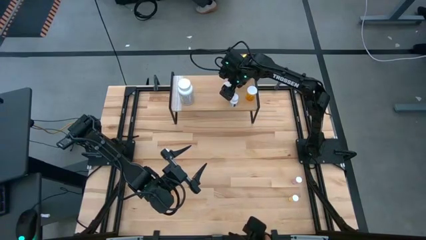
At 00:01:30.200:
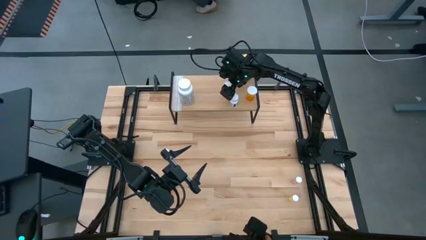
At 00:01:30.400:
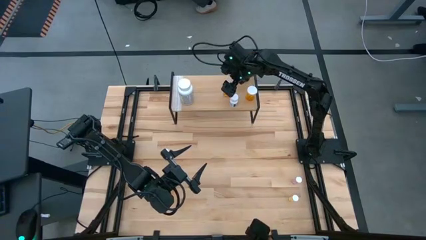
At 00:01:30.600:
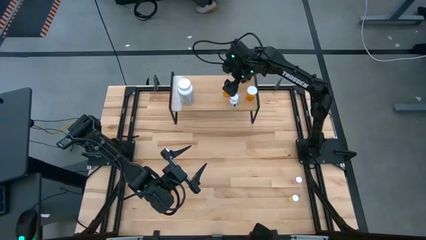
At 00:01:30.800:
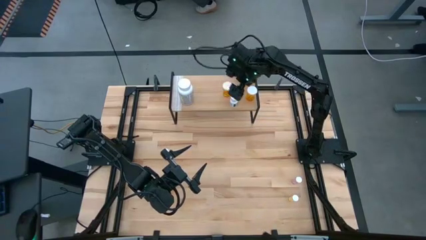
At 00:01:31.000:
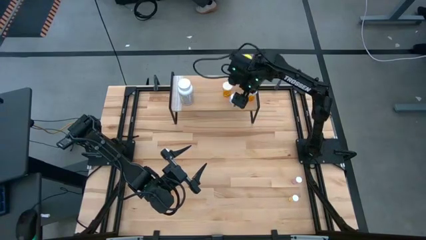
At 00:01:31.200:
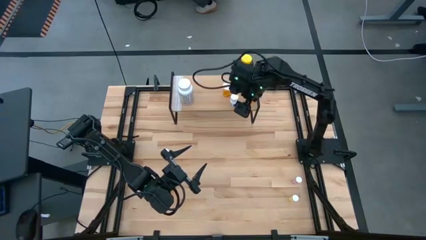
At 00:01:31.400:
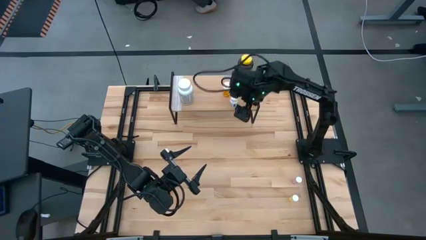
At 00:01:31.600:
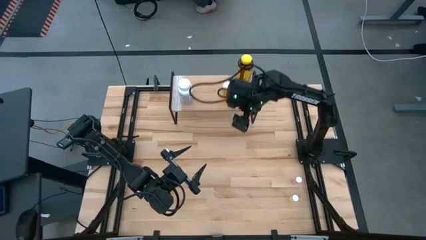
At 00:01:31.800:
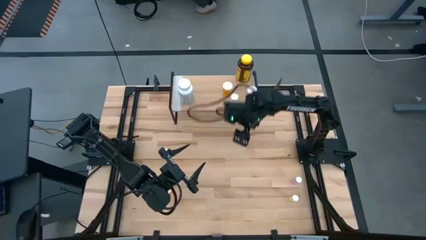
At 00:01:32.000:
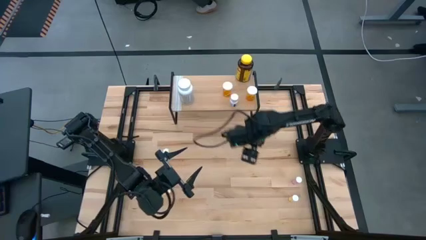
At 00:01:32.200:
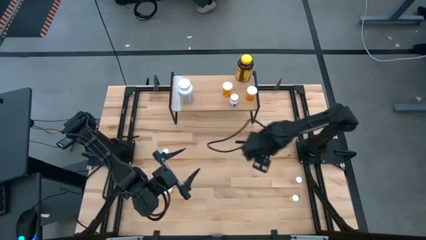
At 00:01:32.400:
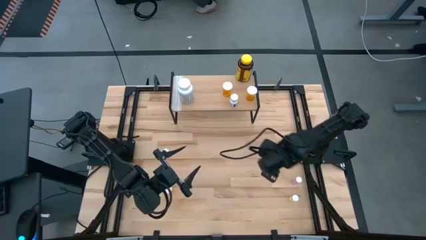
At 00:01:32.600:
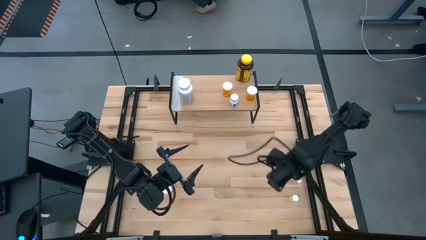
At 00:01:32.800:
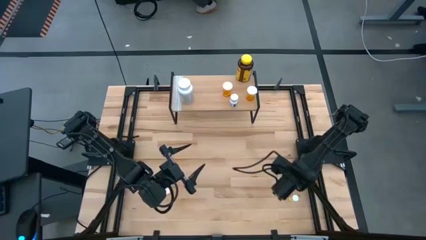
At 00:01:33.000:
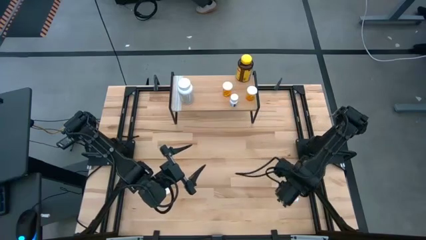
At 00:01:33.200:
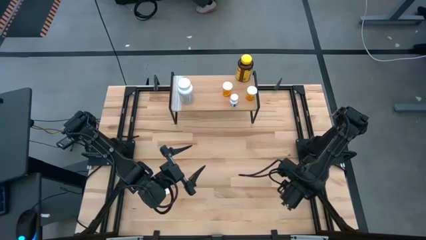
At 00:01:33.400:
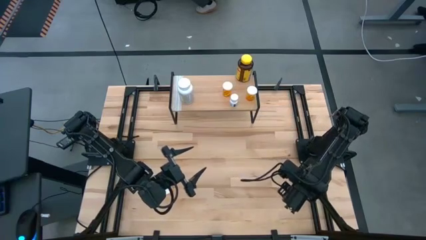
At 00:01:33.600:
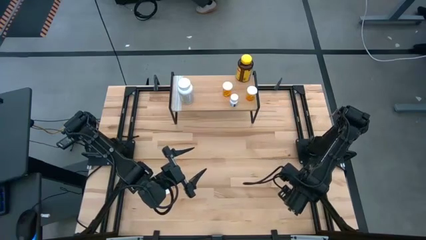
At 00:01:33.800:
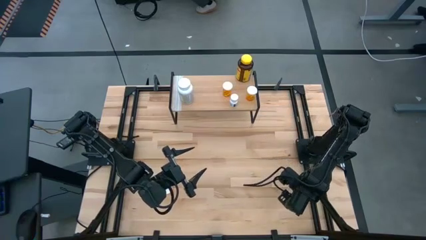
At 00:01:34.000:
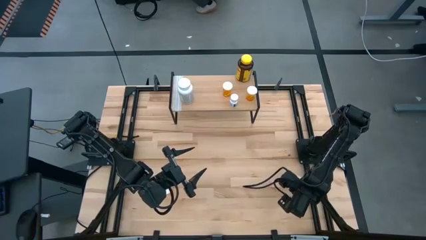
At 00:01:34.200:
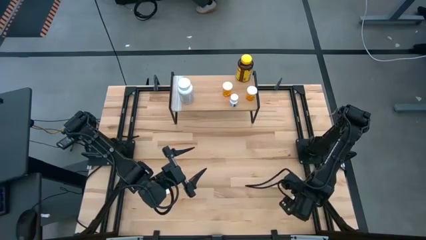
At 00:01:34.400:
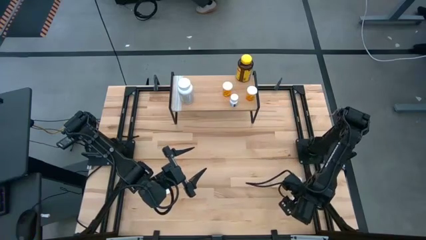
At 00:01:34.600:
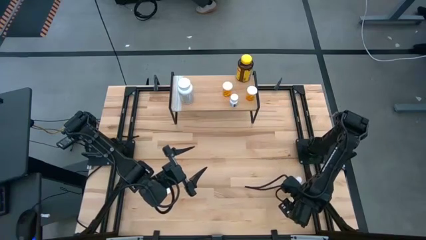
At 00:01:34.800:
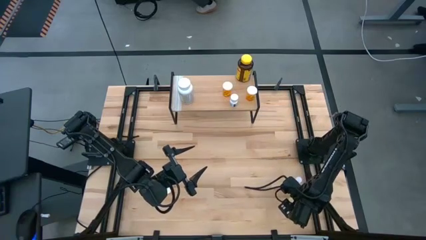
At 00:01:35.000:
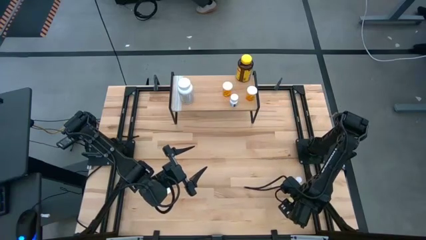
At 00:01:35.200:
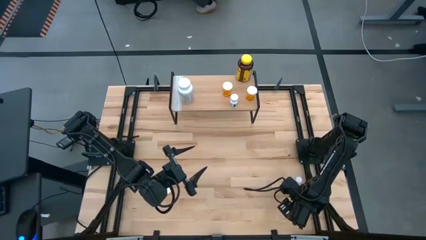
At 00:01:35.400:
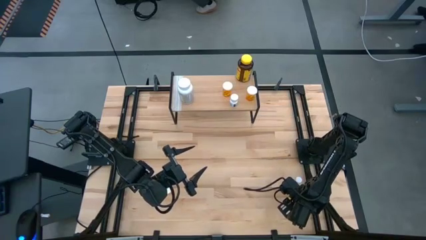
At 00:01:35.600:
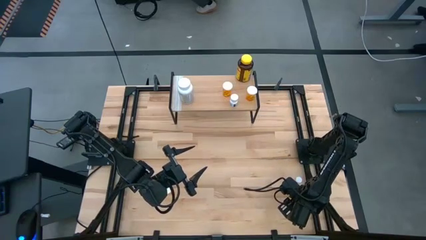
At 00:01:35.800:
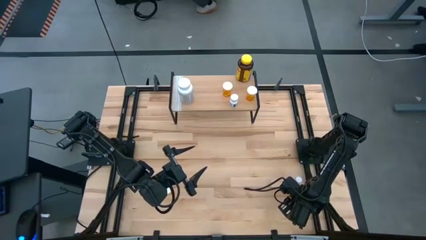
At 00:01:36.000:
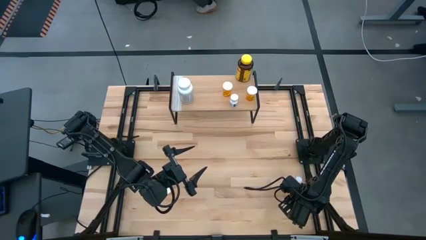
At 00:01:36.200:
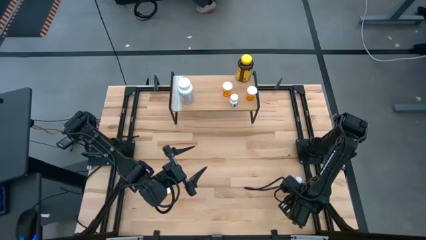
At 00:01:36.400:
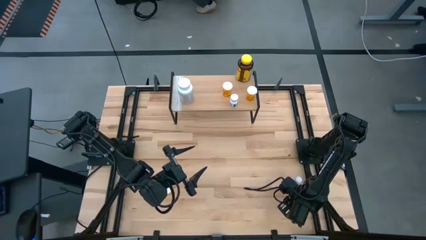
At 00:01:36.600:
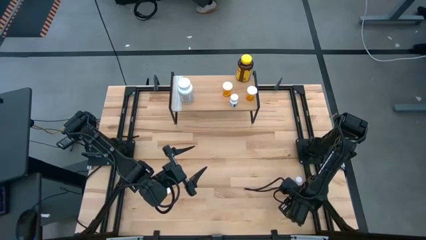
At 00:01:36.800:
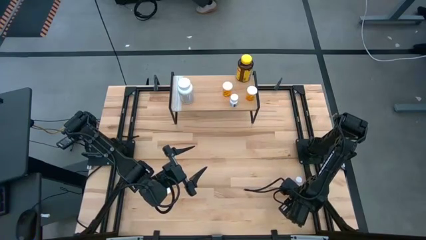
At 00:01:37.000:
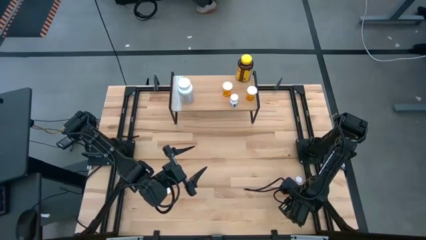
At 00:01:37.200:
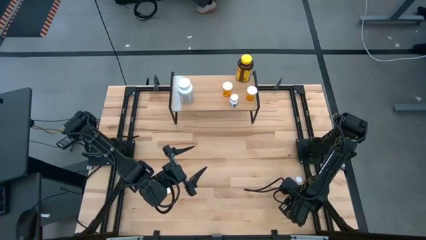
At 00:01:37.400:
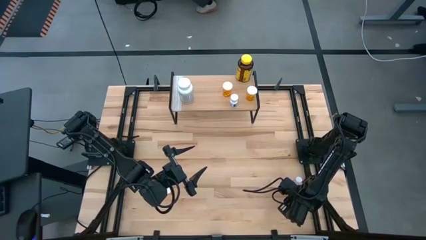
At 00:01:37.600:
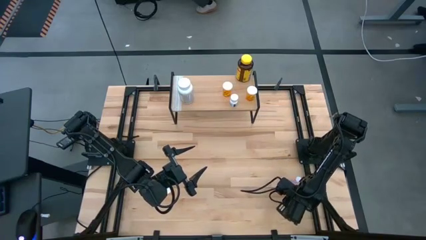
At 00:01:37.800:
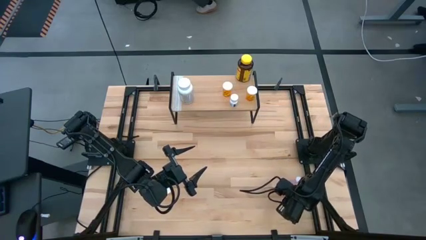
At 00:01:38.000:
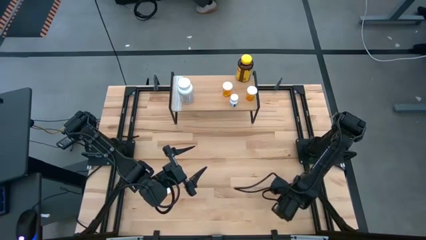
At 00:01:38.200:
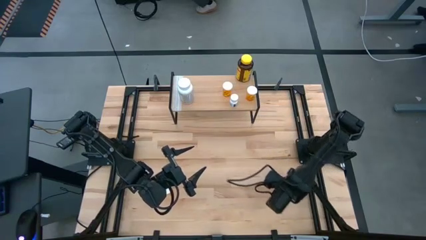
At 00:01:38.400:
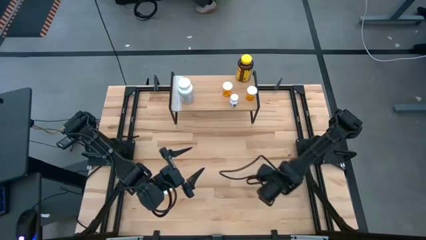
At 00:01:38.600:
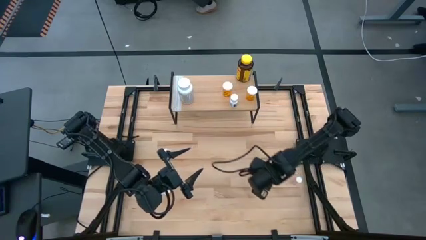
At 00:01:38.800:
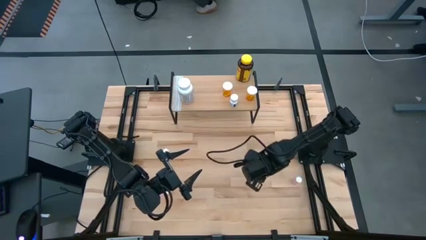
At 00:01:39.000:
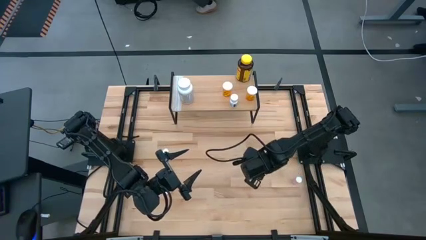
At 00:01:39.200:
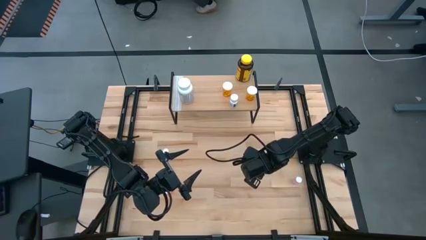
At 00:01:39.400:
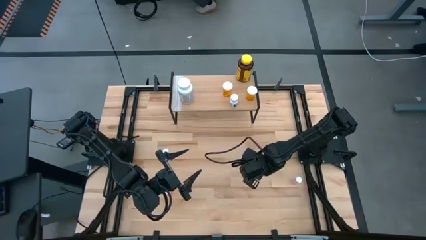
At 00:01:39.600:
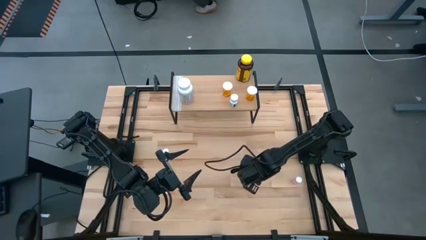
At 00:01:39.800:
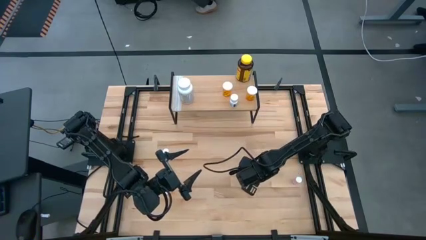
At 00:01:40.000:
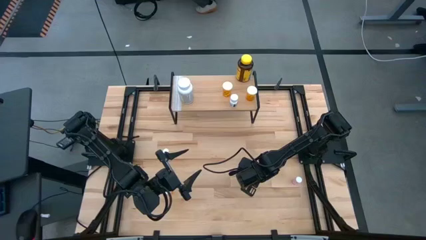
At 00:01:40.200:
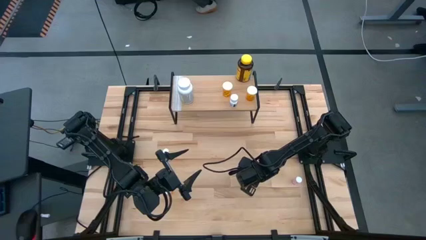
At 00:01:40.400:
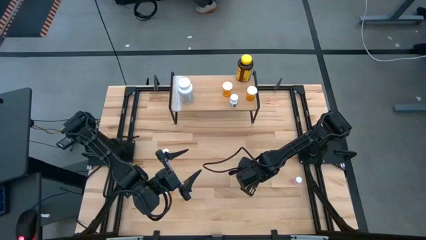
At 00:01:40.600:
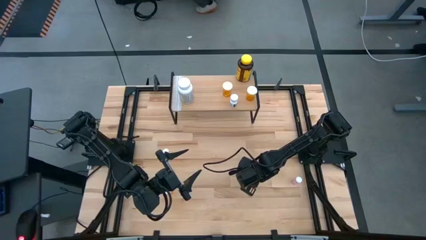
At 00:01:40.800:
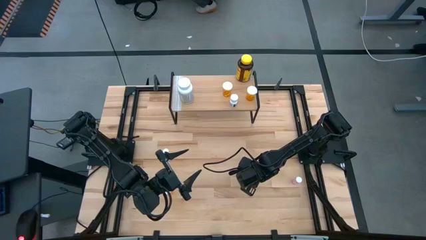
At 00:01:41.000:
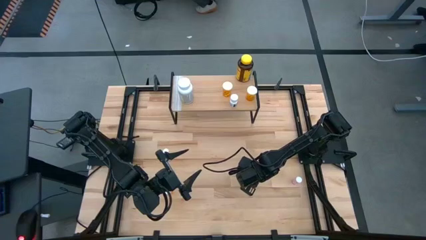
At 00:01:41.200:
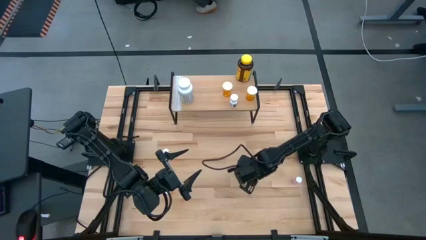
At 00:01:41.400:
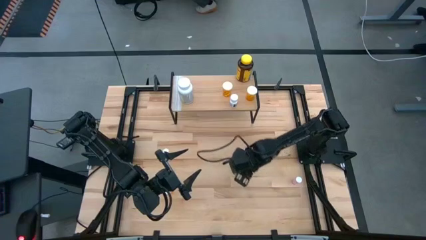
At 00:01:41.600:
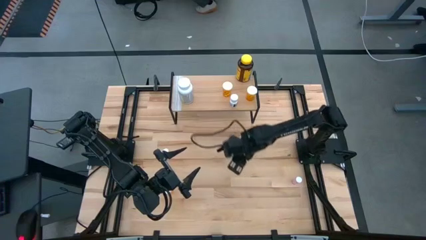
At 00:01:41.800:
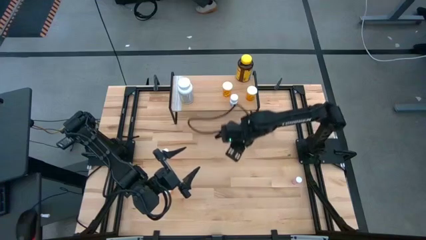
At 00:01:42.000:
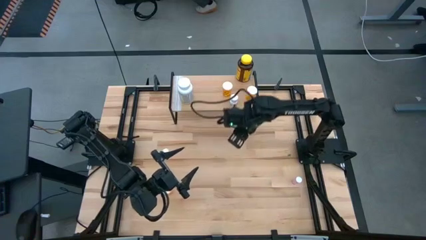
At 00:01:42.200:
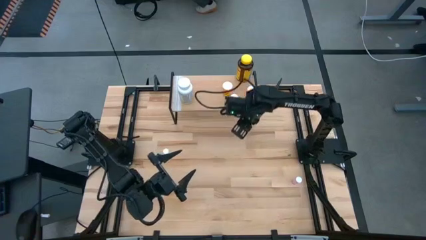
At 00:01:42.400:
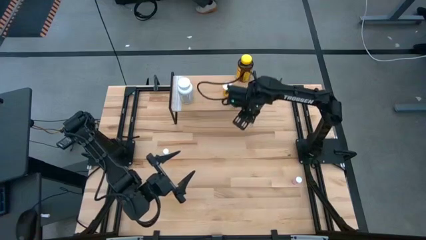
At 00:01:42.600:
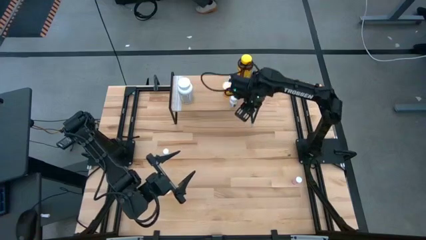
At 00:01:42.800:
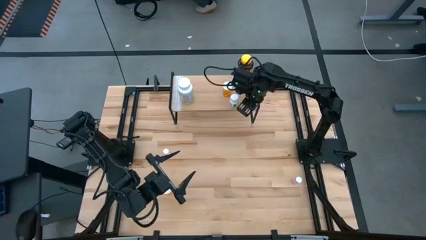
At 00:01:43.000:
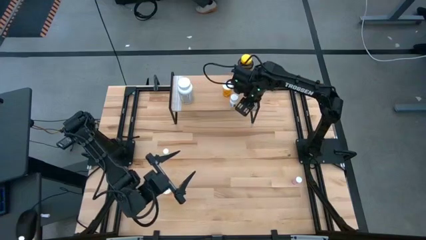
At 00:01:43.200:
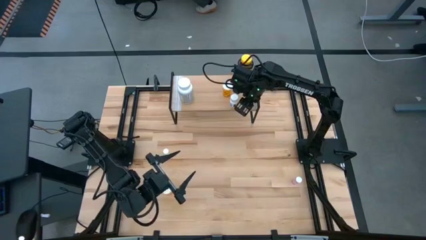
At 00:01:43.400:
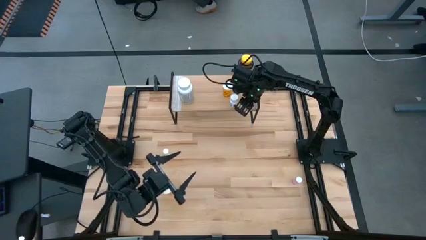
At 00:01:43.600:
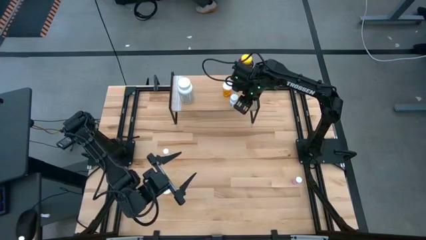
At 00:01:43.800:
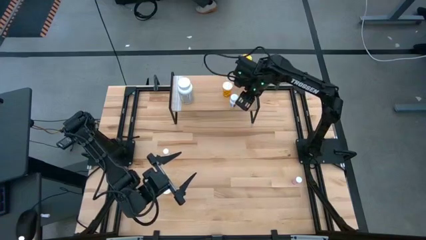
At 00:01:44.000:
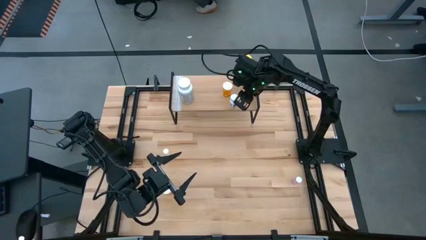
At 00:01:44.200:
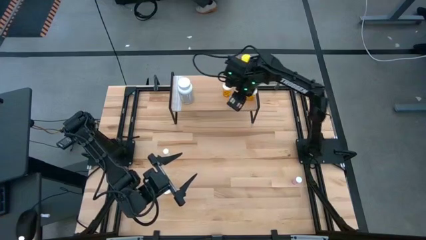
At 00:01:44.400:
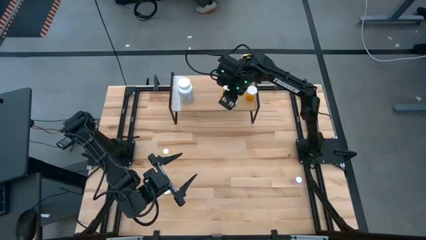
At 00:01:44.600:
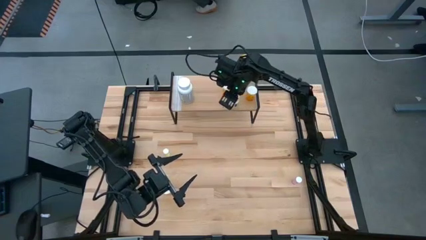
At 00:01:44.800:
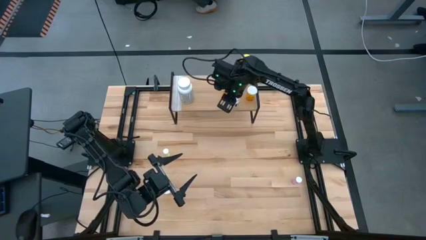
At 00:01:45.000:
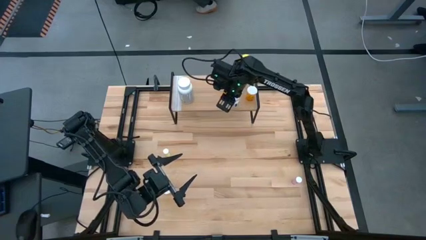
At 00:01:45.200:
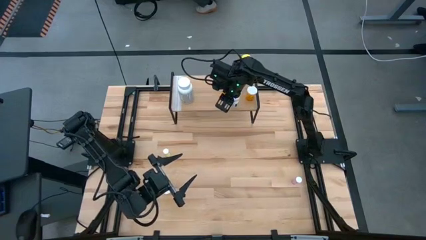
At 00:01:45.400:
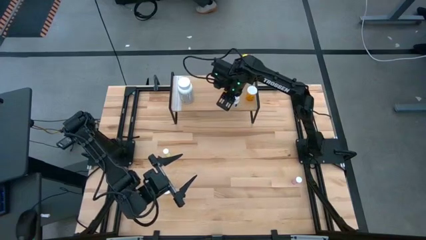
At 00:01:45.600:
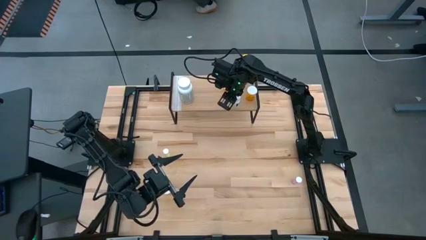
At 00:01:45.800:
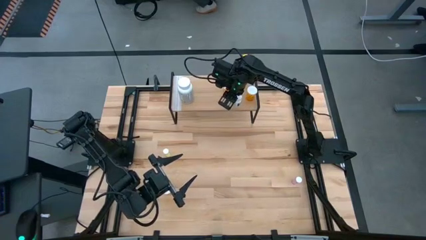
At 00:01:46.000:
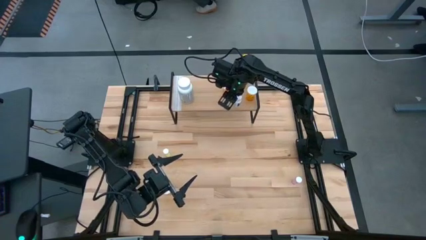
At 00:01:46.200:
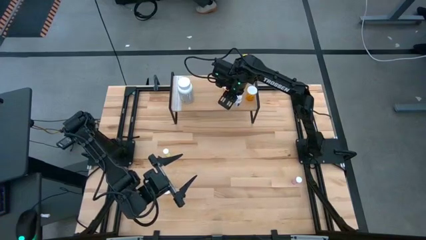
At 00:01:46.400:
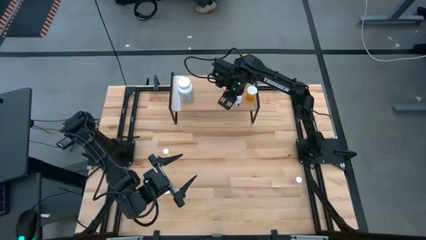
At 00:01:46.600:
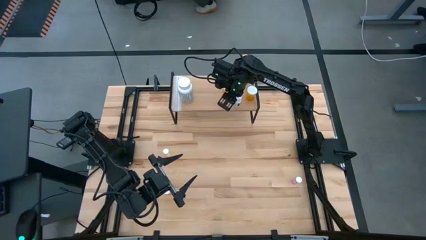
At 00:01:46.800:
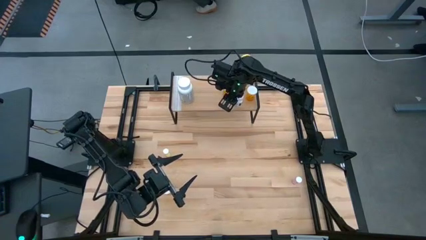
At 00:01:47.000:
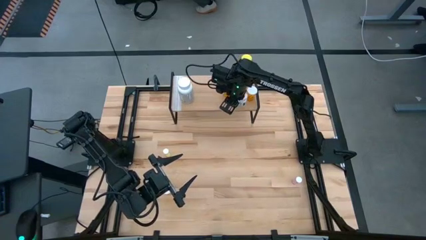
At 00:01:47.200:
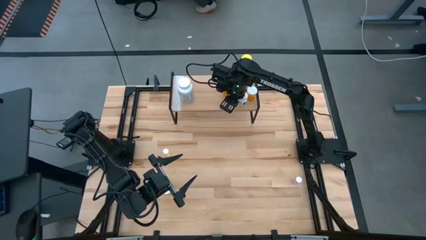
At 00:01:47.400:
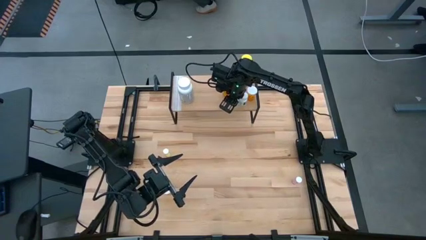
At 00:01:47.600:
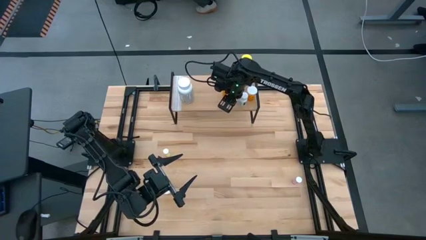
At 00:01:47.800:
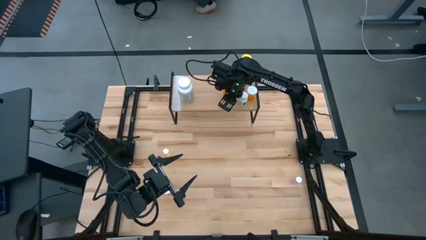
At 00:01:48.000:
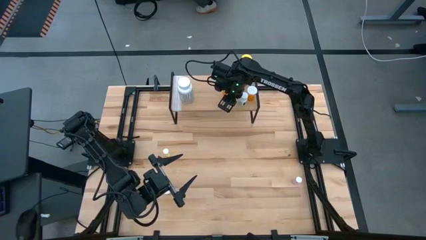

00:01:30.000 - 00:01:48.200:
Task: Pick and place medicine bottles onto shelf by color
Put the right small yellow medicine bottle on the shelf
